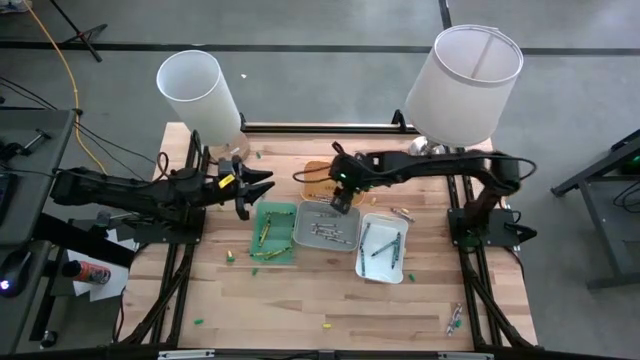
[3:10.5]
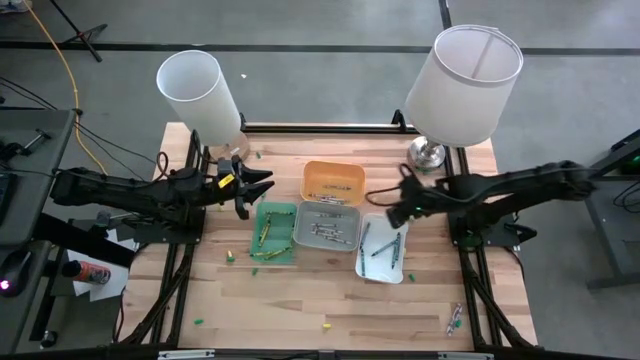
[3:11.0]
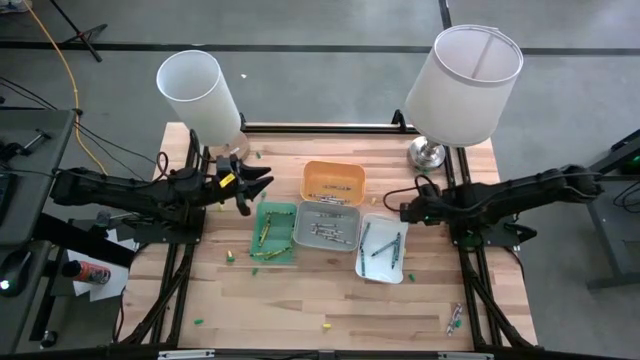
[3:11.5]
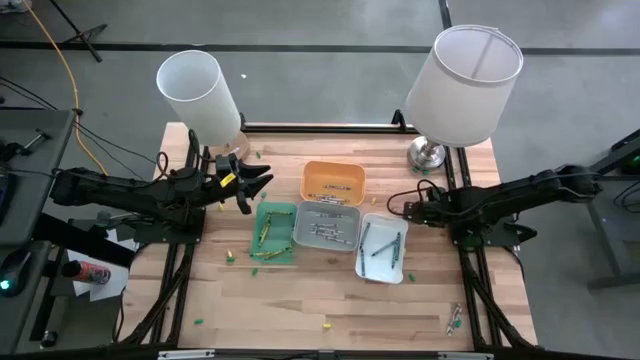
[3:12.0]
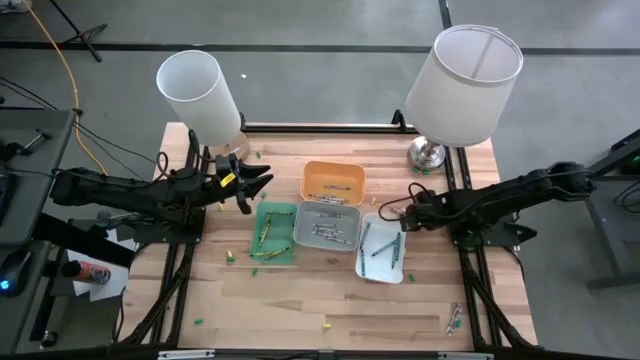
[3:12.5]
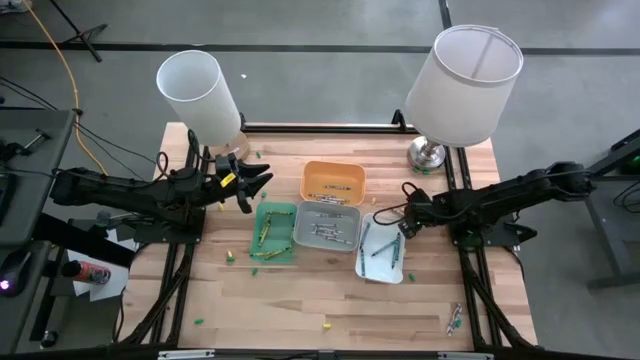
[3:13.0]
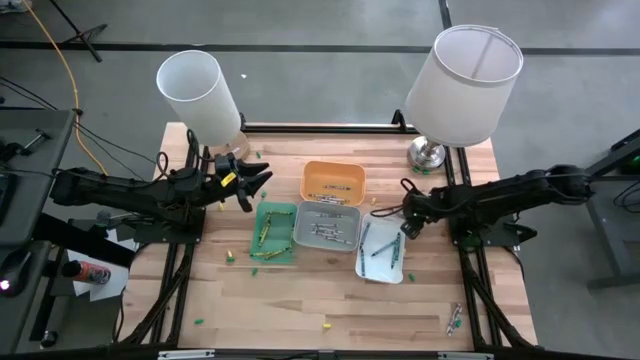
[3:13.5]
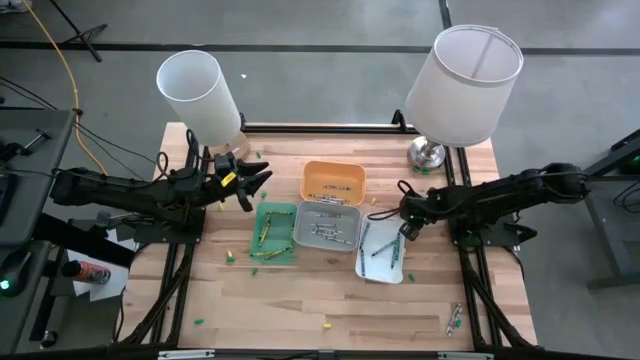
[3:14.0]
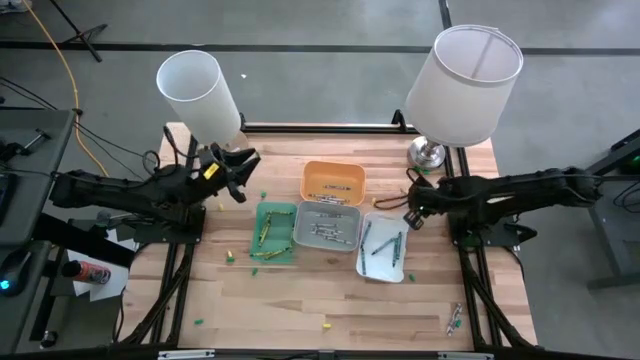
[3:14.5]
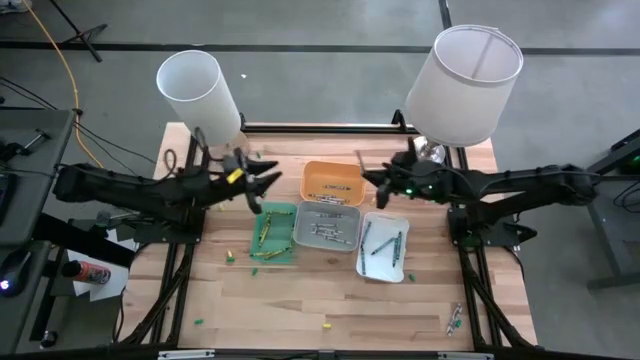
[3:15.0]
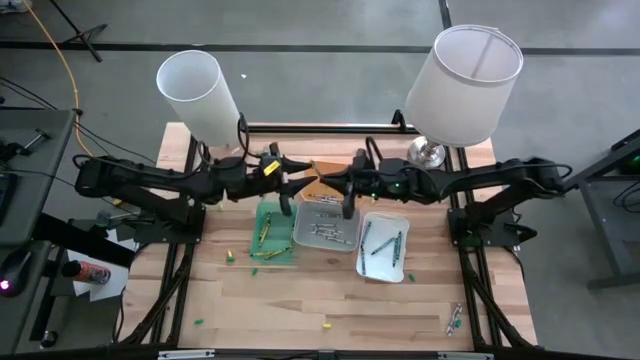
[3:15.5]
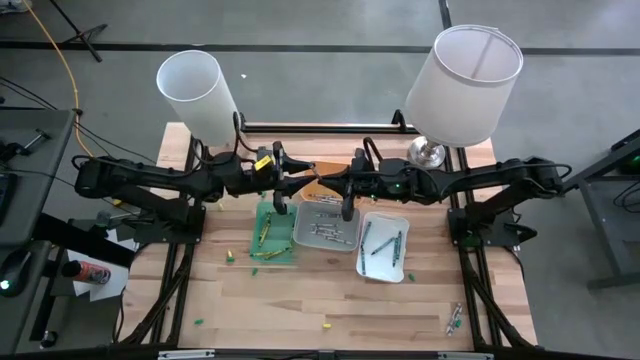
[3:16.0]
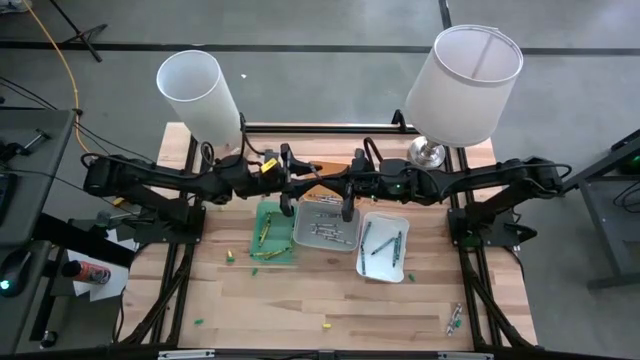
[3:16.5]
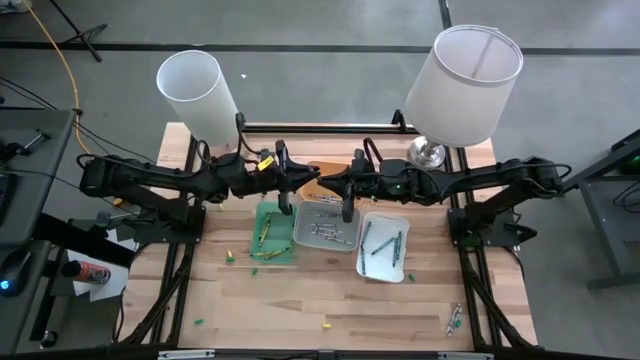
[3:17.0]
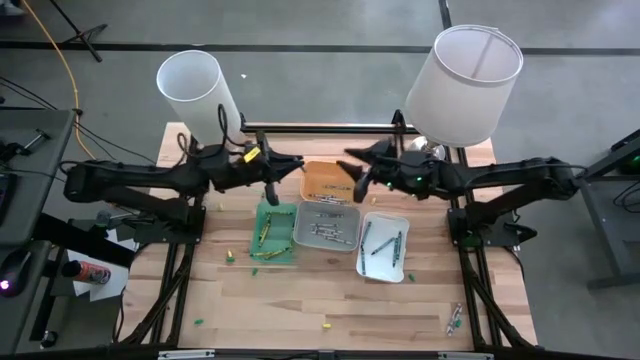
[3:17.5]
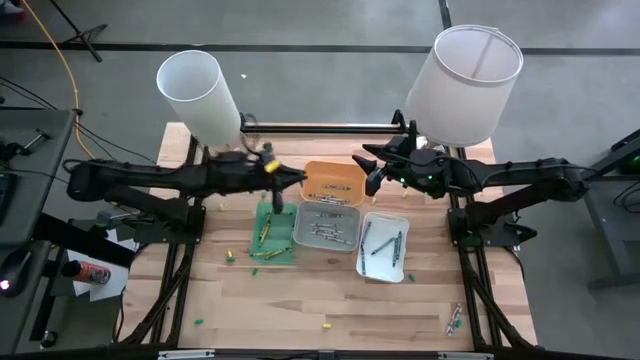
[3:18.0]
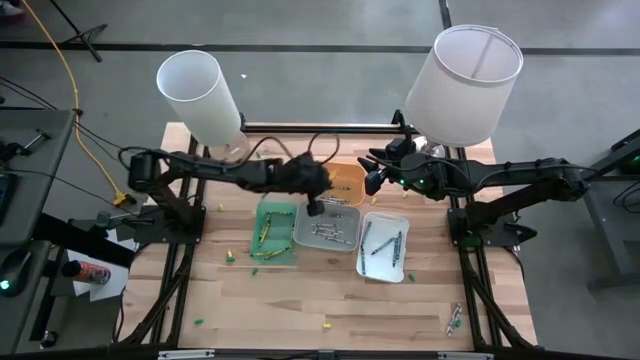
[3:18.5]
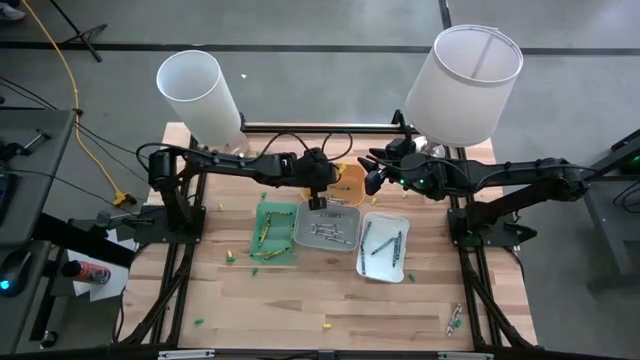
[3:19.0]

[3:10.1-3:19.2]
Task: Sort crayons
Put the gray crayon into the yellow bin

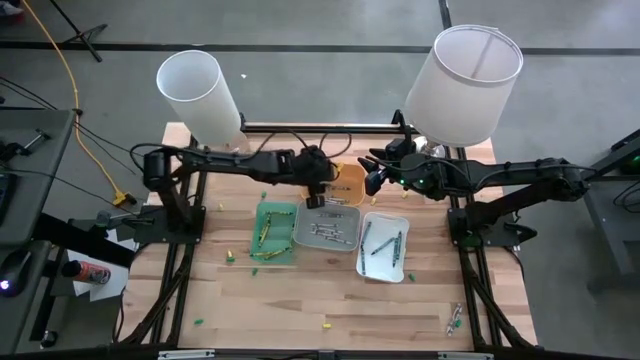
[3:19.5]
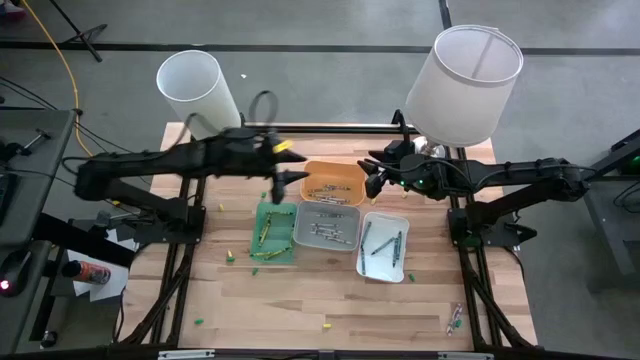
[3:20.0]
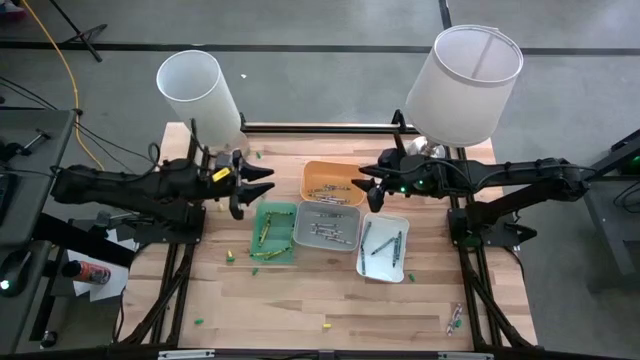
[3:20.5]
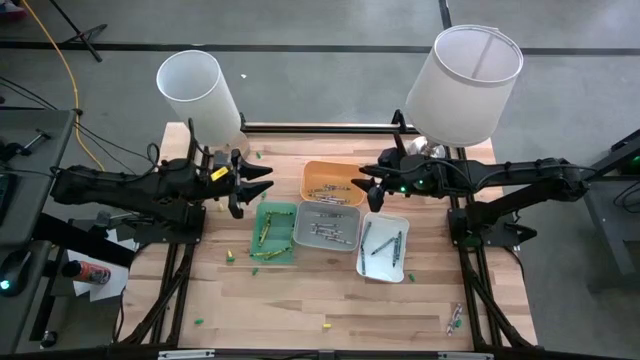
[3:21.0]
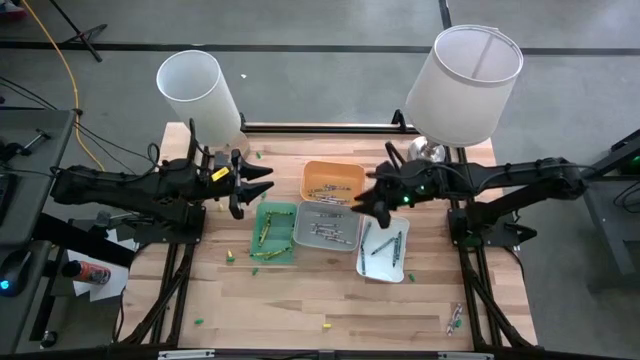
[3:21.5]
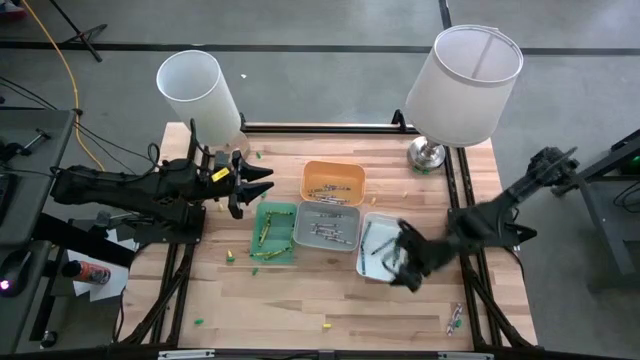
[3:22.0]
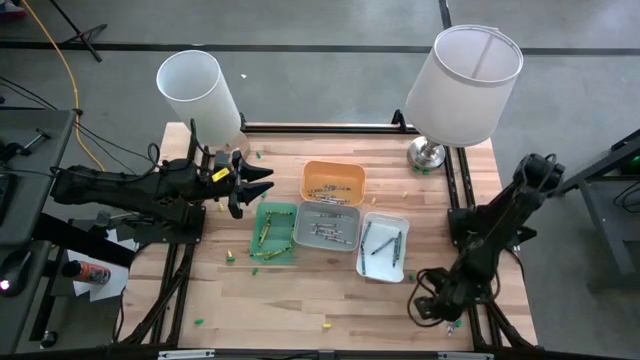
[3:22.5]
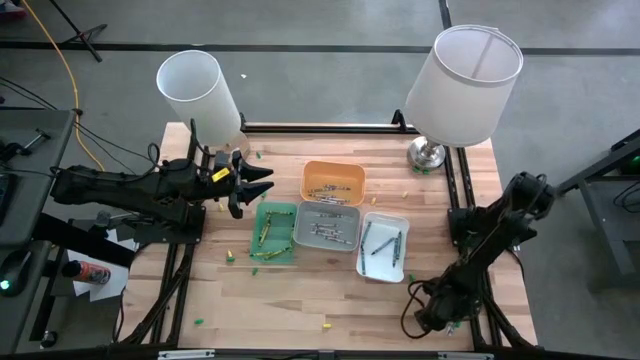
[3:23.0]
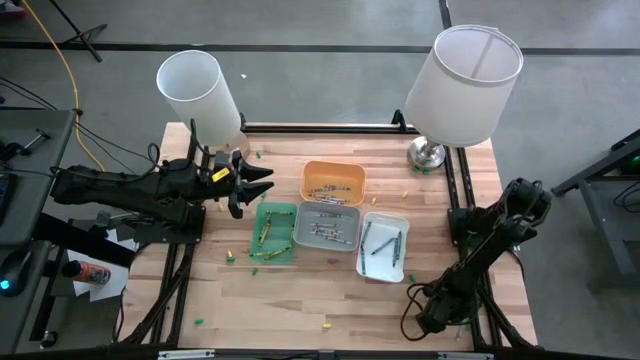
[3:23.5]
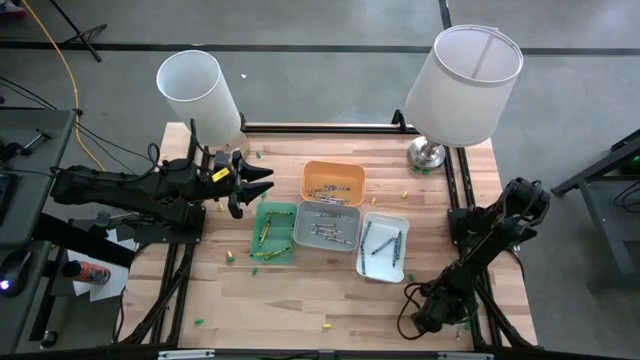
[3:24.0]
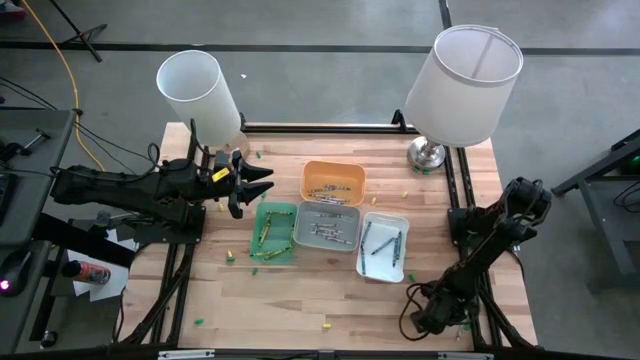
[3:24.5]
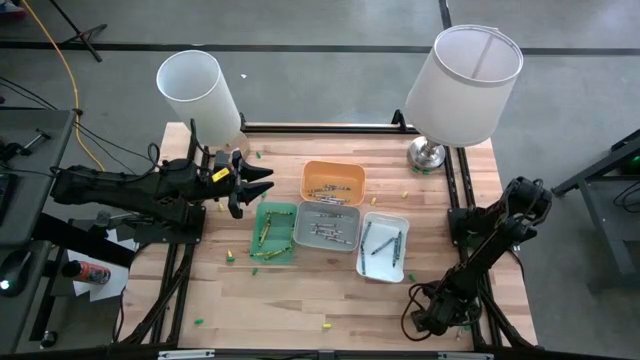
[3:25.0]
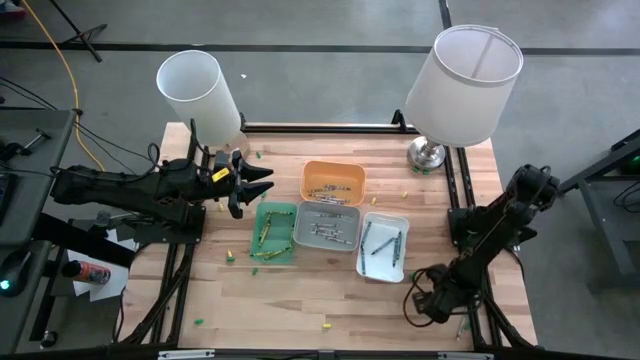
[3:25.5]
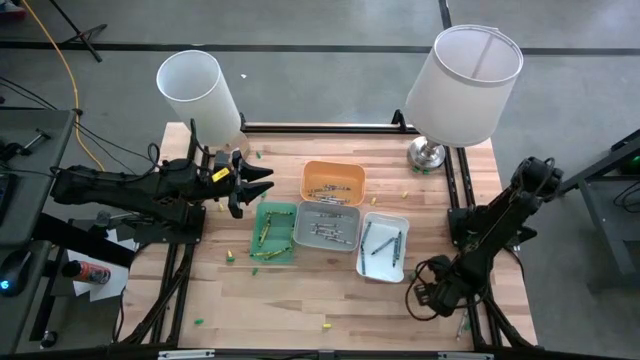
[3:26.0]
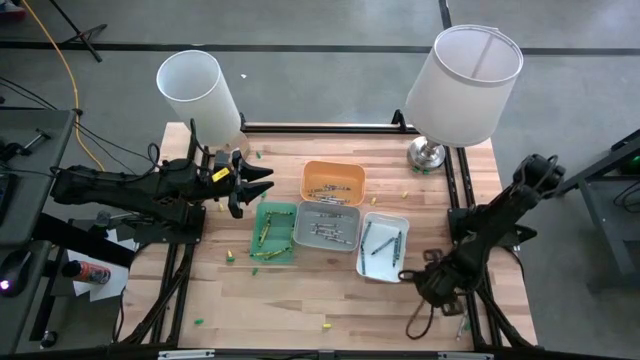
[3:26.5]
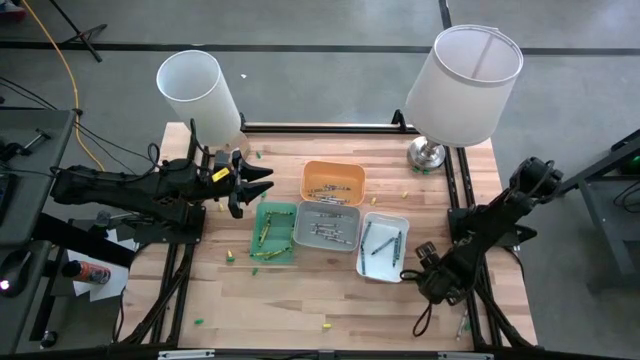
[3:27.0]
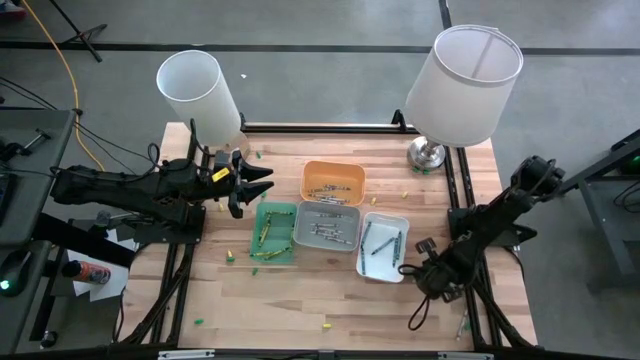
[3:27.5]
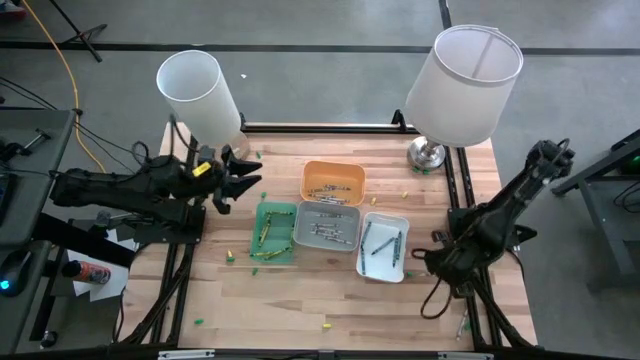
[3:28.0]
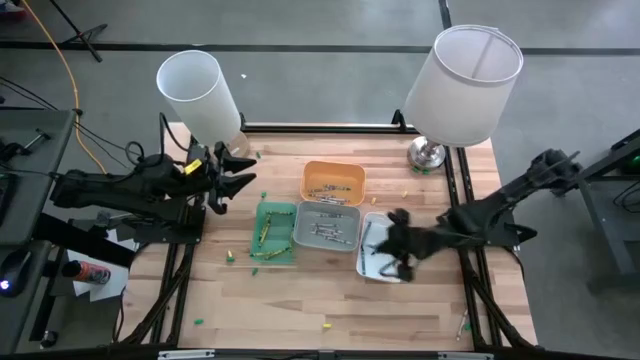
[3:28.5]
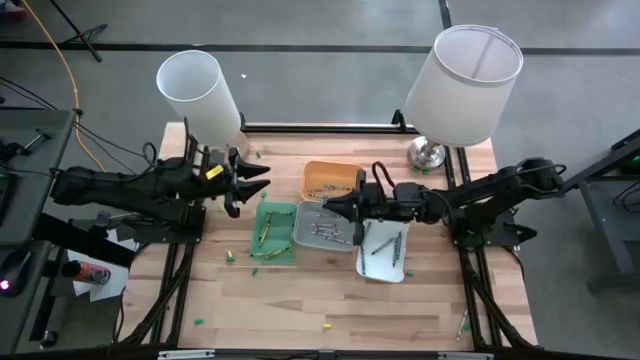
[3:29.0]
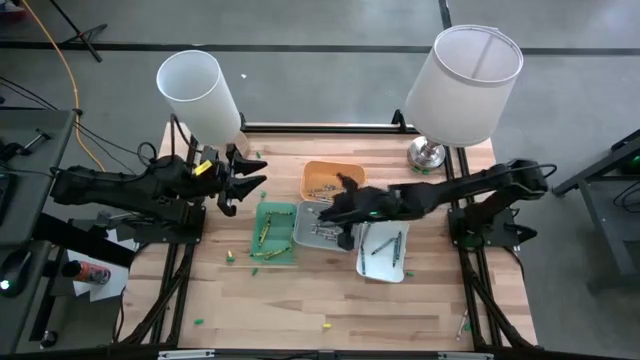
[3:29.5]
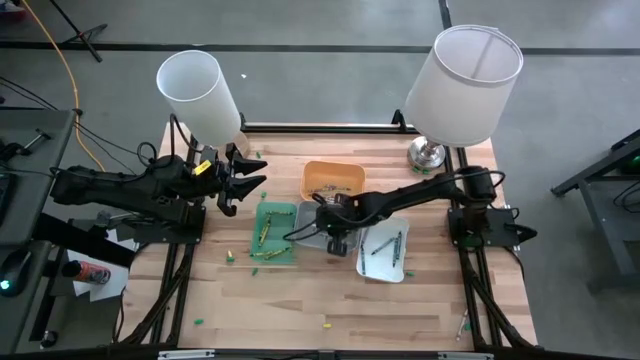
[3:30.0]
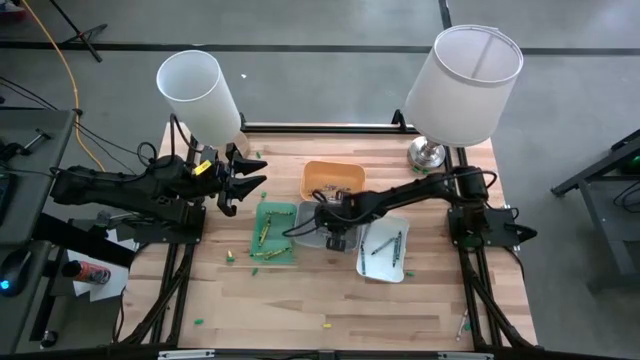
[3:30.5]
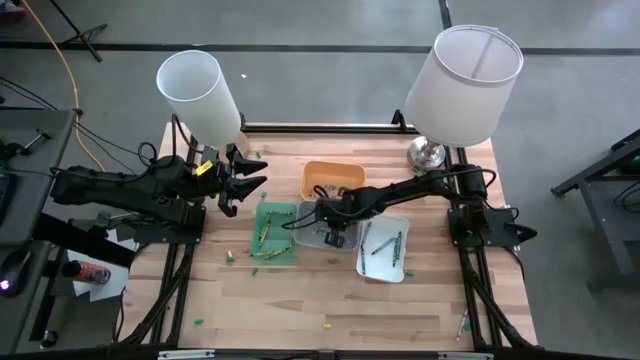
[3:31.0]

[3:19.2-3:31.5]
Put the white crayon into the gray bin
